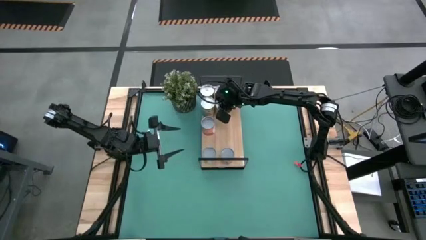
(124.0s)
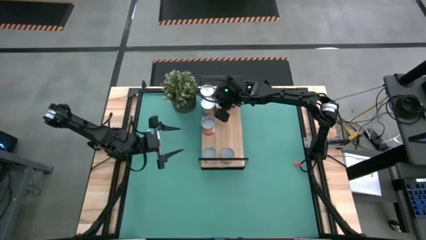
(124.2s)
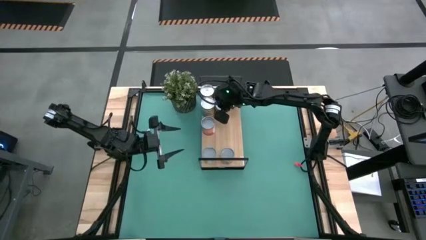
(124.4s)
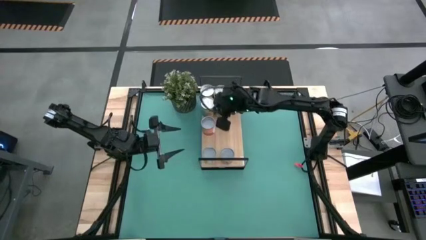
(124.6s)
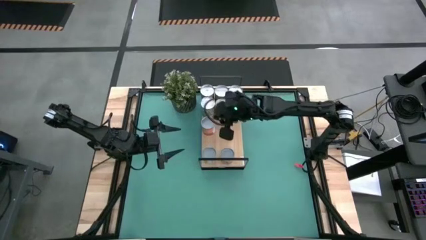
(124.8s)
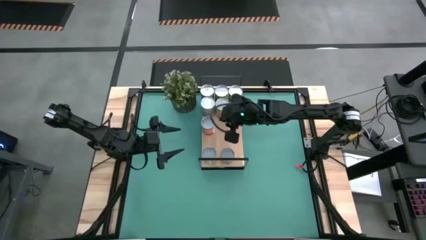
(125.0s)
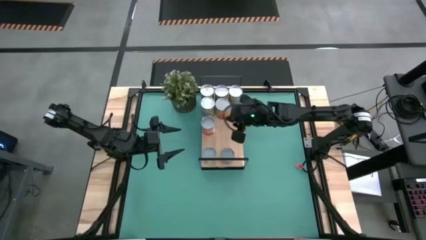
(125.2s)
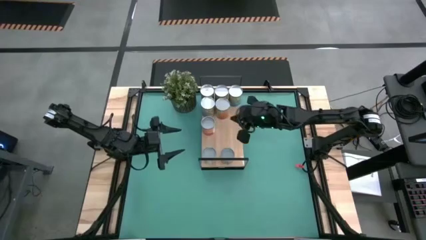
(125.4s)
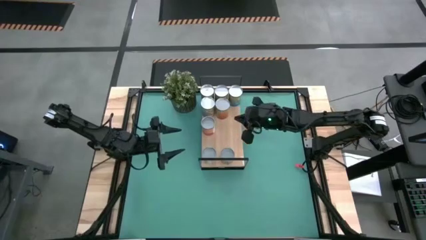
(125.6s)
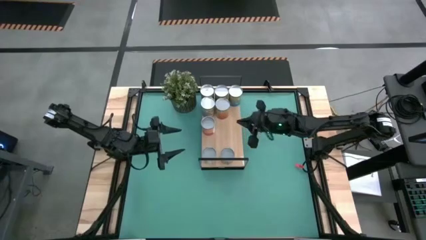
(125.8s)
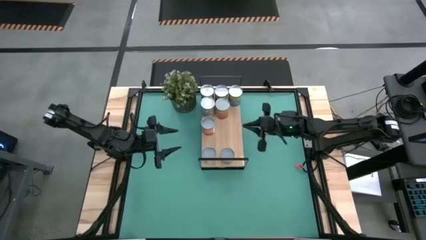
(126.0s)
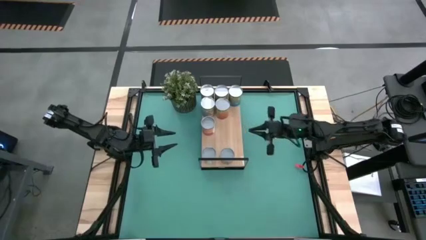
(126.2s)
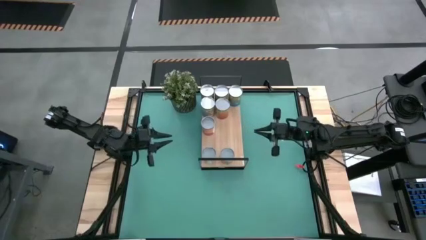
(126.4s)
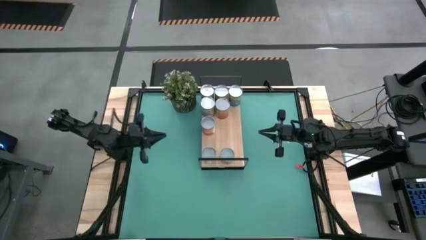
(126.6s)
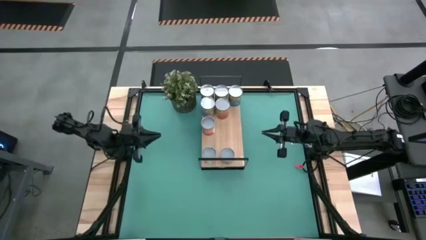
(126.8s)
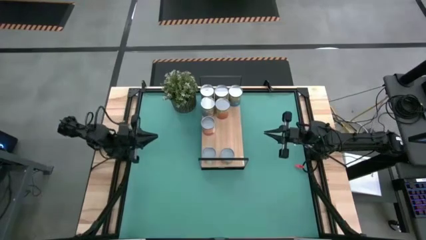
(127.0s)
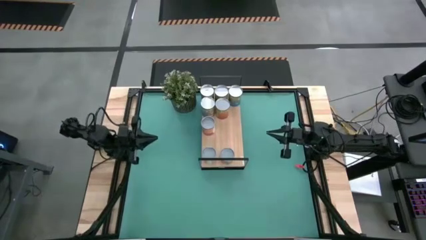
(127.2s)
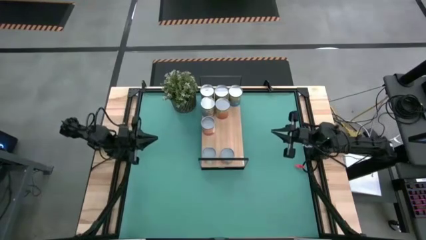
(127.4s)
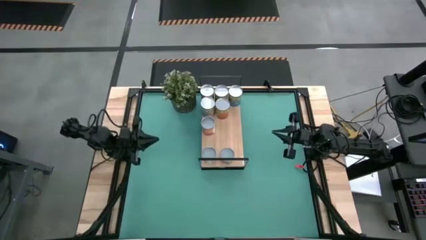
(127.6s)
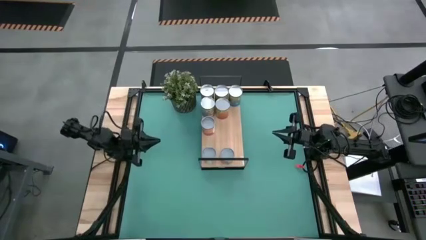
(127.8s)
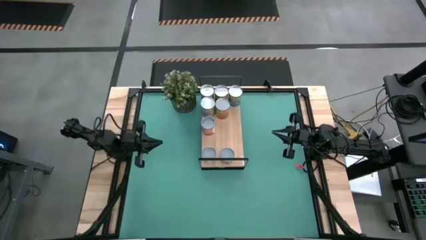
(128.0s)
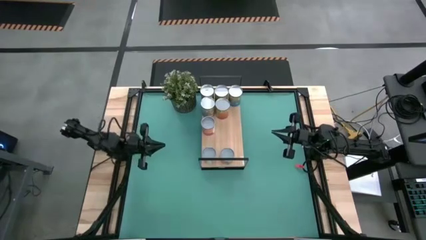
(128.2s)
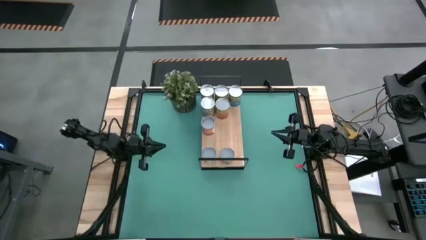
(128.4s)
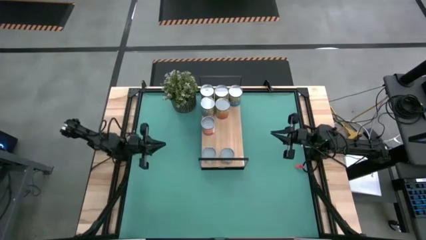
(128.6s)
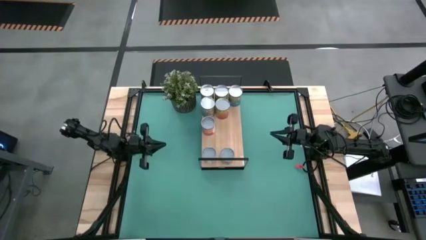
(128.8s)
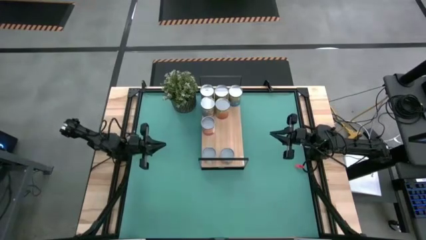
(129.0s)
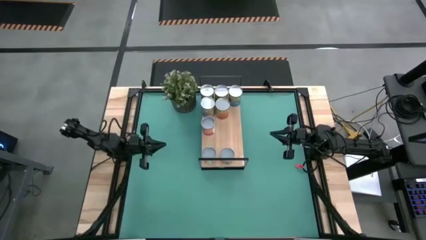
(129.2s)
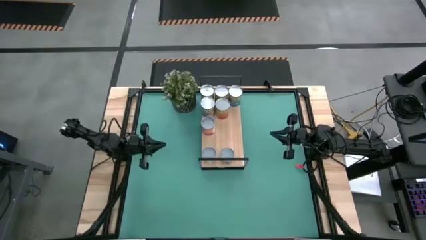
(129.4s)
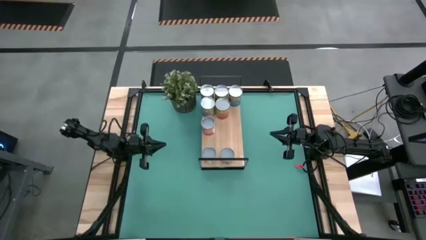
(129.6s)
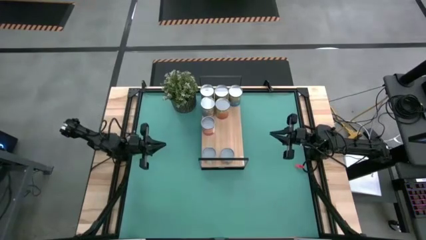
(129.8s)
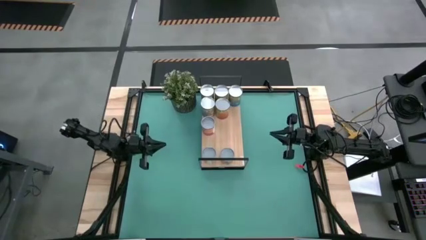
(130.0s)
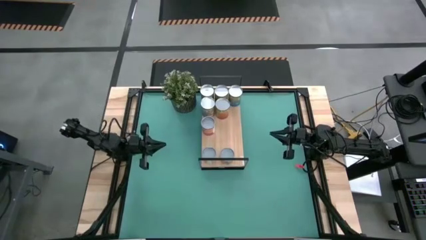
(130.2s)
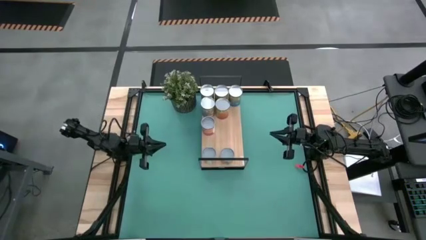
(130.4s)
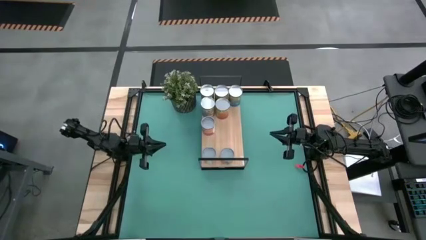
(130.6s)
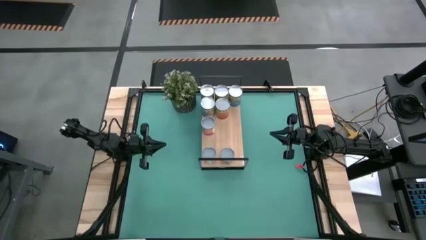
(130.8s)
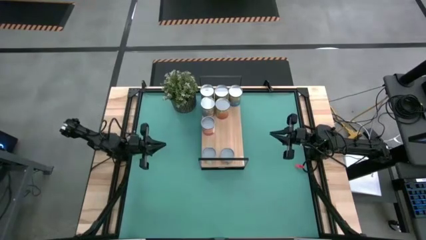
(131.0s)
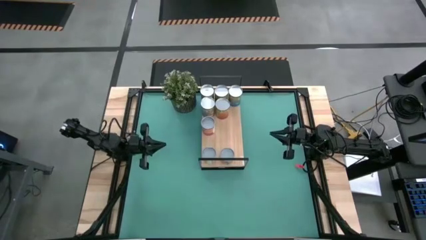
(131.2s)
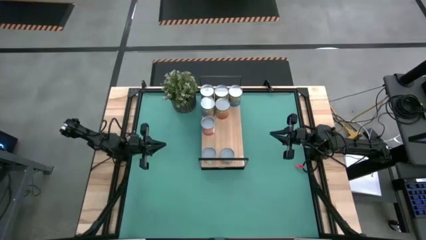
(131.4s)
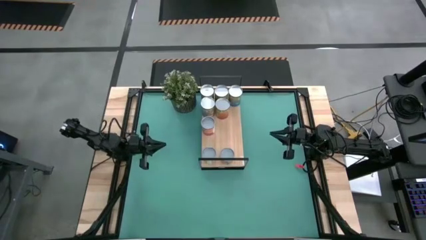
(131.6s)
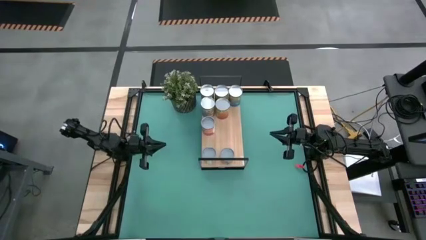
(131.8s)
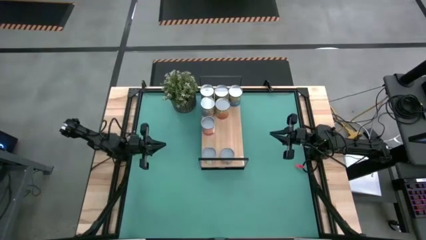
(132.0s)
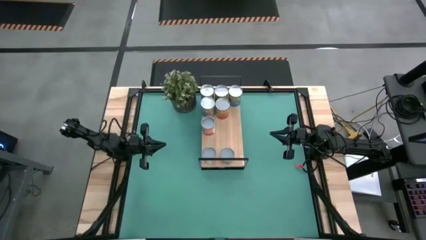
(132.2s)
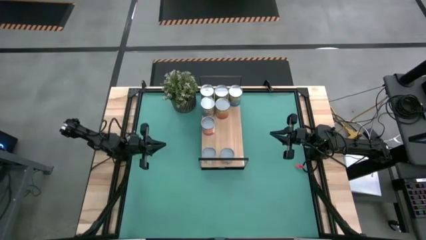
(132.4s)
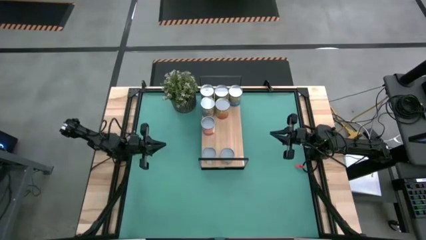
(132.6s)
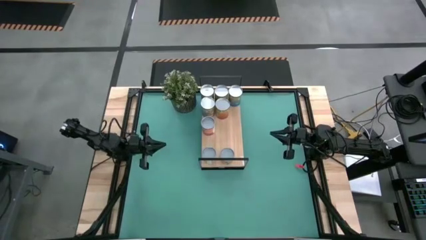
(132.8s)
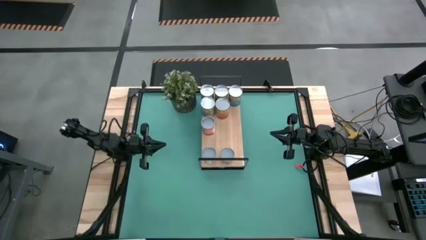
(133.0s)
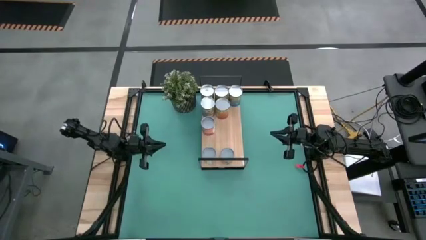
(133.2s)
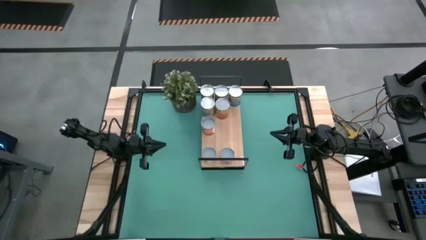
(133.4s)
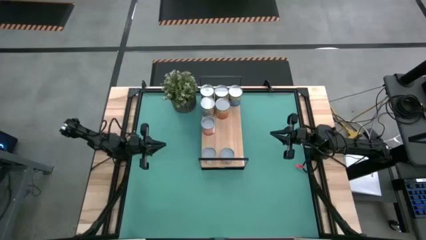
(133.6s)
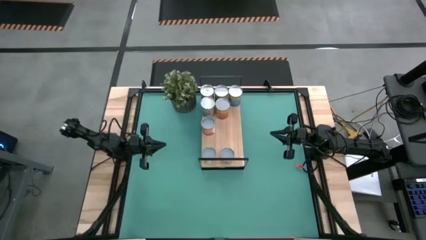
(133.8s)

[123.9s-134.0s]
Task: Pick and place cans onto a shelf
Return to Home Position

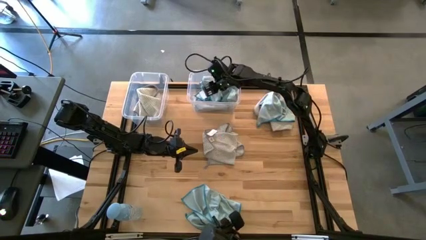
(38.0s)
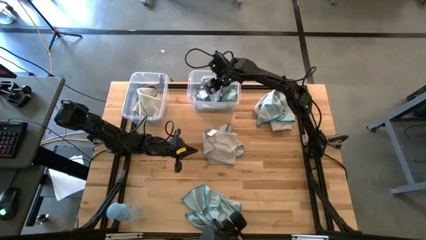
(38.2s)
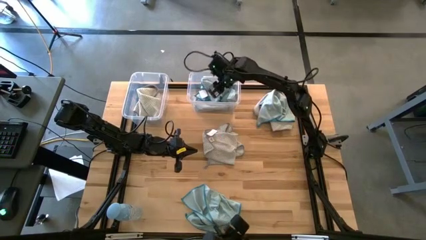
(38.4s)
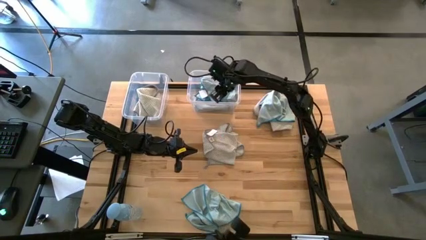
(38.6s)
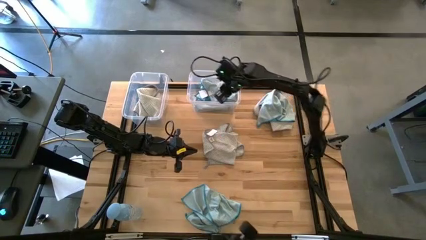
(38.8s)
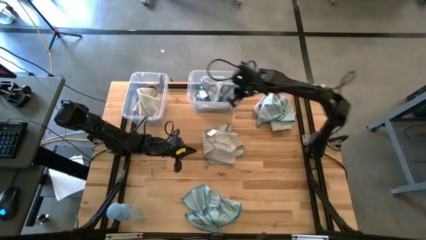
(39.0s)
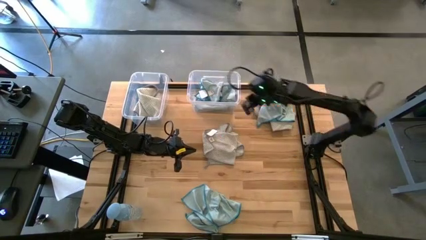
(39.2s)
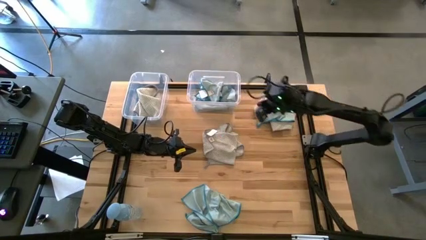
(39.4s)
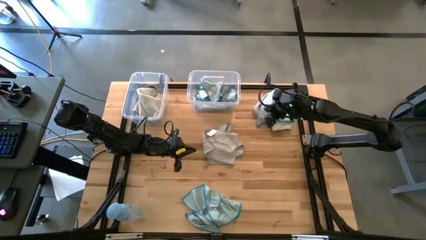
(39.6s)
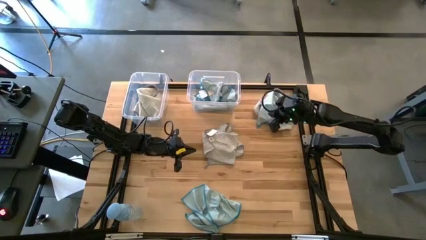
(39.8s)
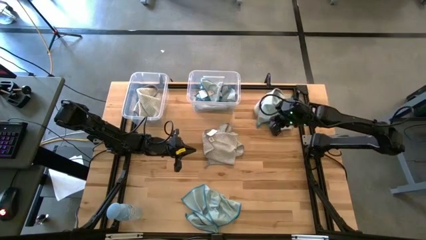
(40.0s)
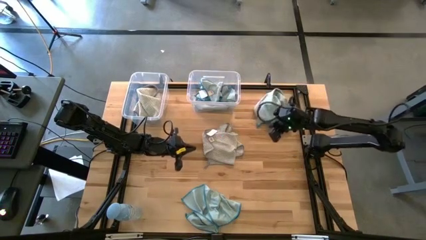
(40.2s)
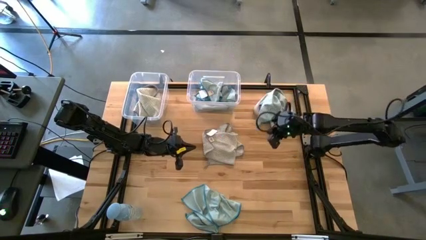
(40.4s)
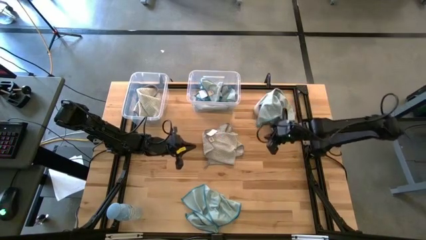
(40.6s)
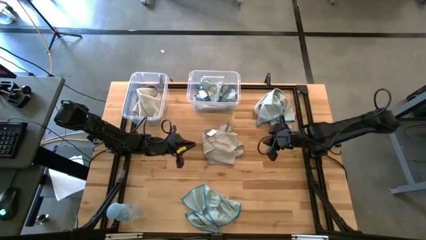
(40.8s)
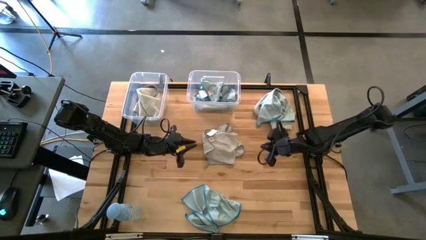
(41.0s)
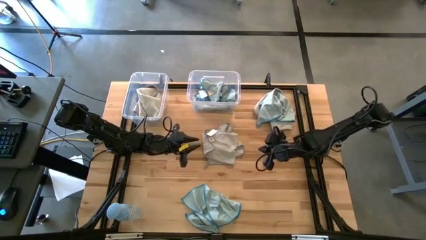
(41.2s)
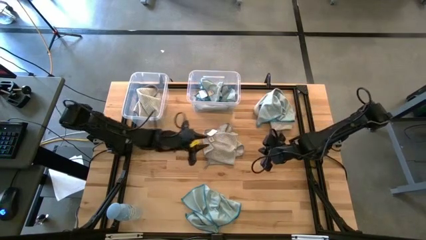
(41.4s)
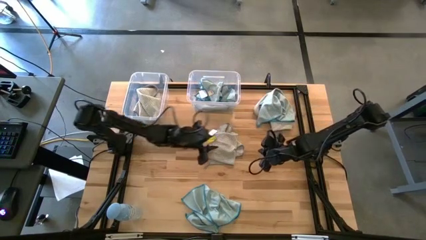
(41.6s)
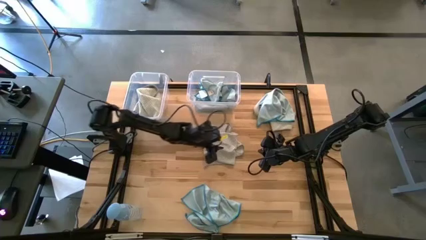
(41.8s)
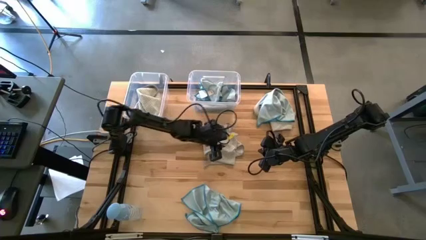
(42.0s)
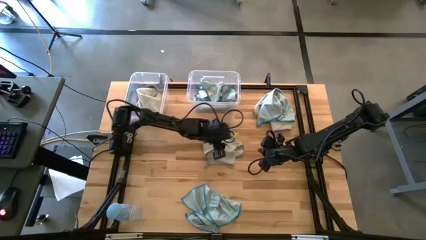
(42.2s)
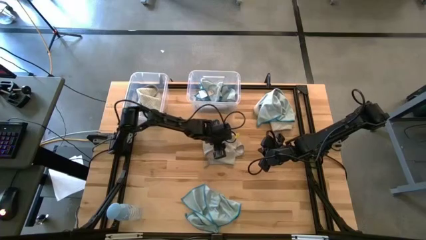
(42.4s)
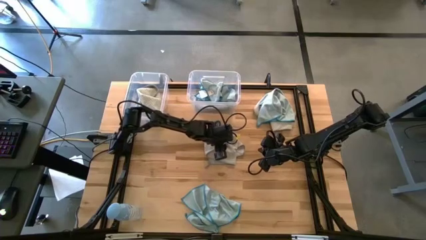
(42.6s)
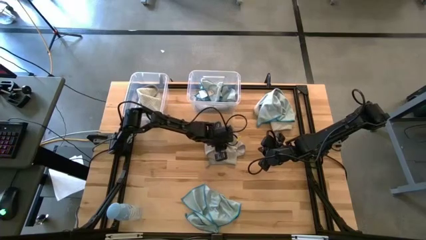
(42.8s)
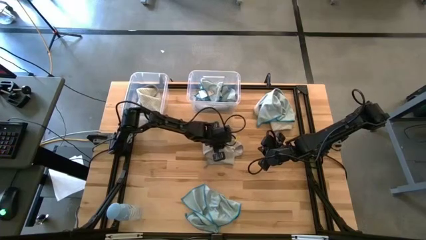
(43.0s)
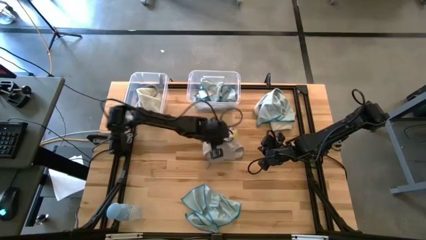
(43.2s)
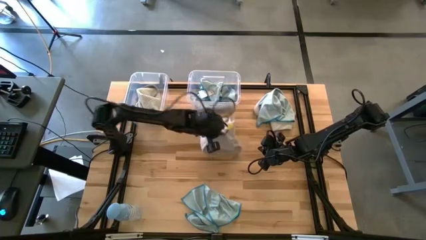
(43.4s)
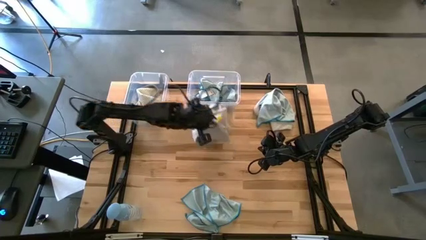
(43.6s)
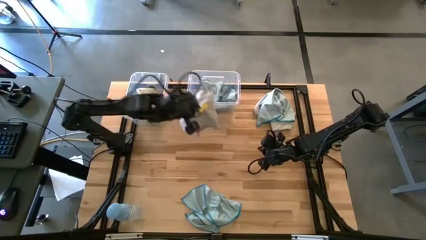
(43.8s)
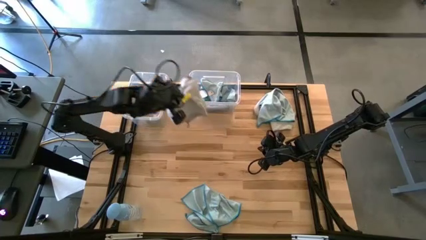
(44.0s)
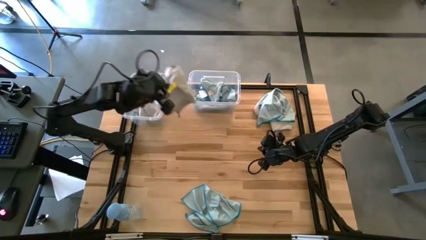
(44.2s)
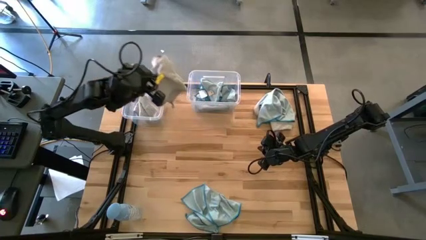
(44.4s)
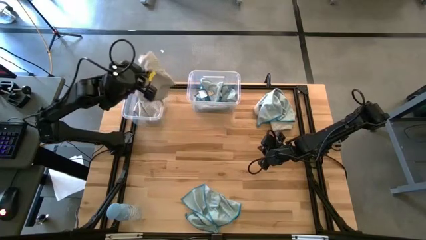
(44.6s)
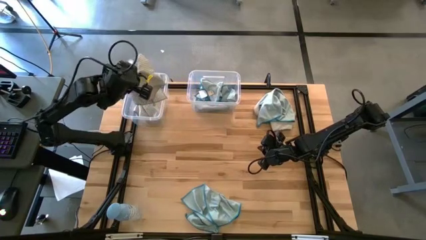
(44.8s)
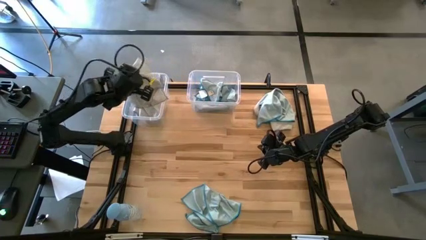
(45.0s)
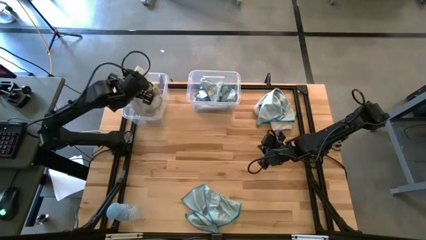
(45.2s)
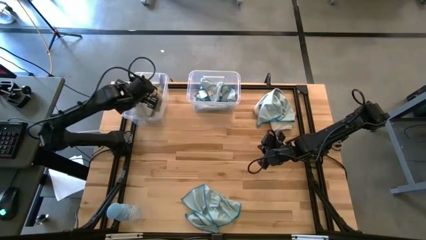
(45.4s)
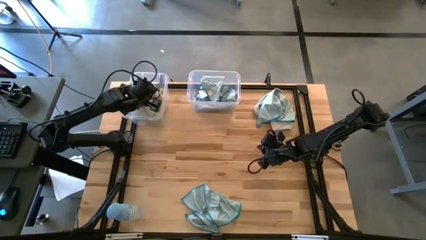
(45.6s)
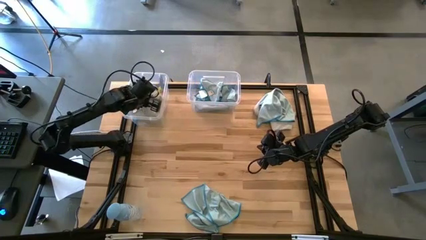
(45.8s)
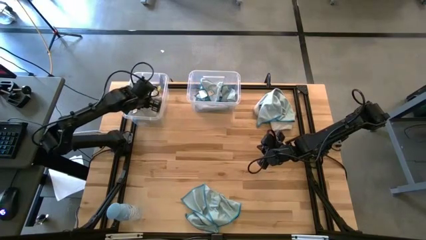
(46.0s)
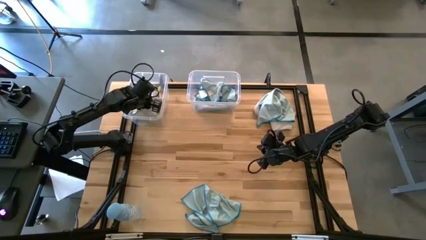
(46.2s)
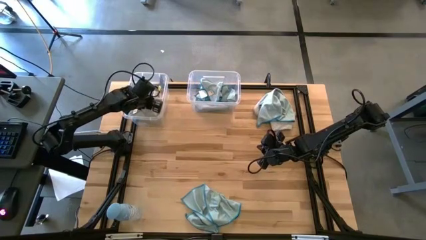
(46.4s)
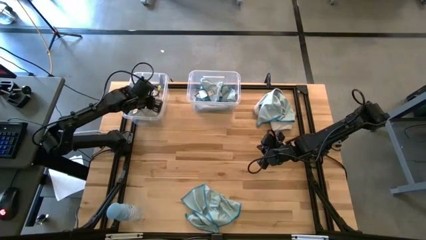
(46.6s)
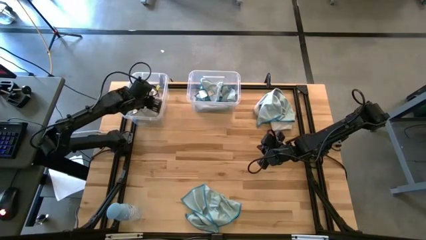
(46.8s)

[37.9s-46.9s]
Task: Sort microfiber towel by color & place in baskets
Put the bottom brown microfiber cloth into the left transparent bin
